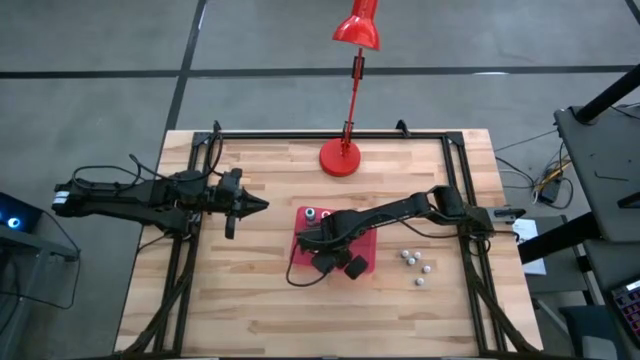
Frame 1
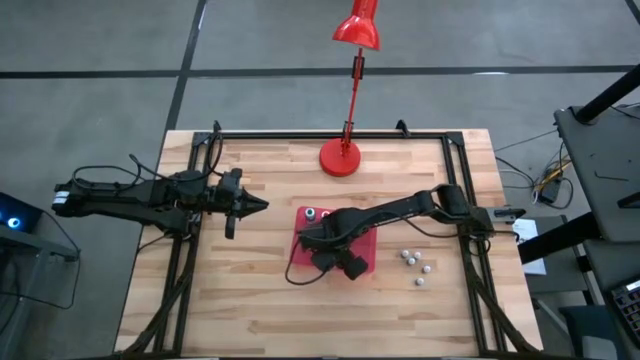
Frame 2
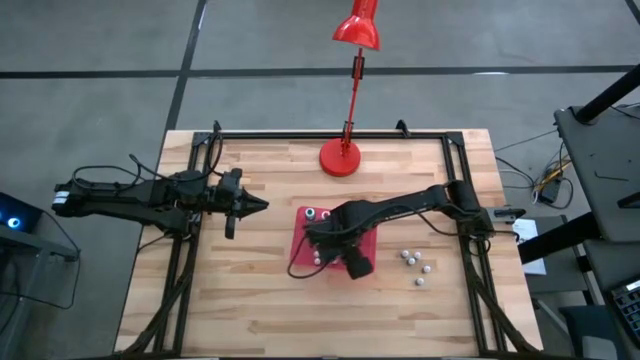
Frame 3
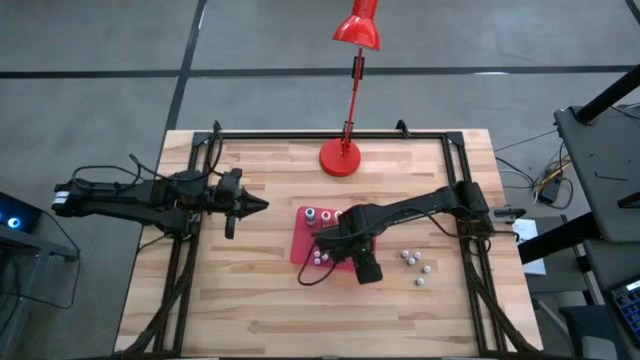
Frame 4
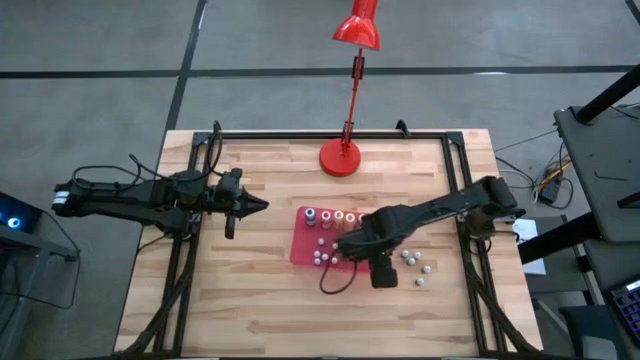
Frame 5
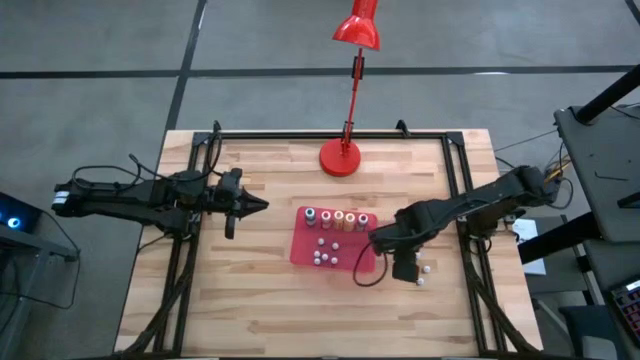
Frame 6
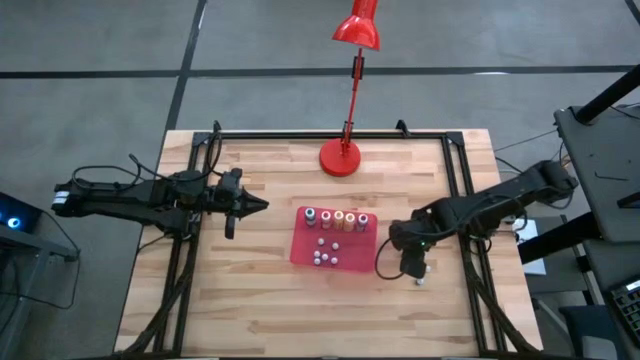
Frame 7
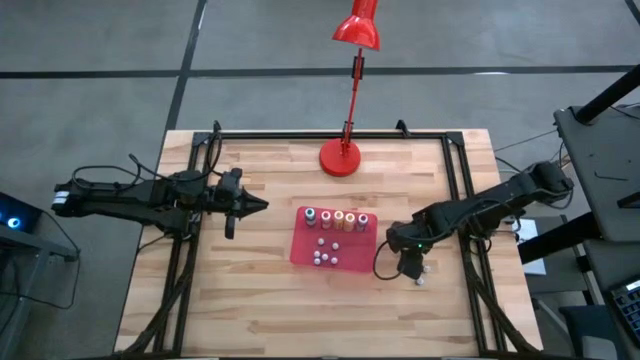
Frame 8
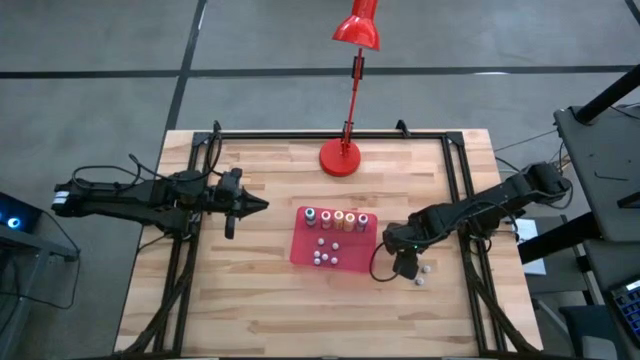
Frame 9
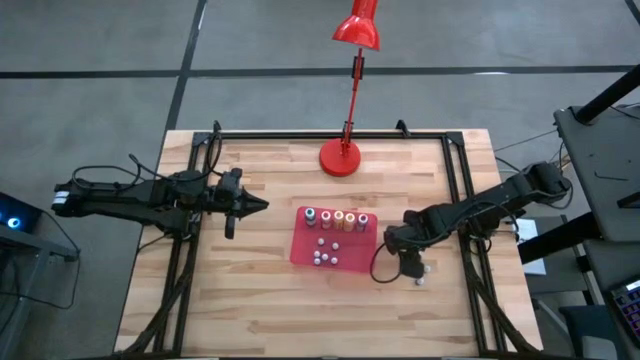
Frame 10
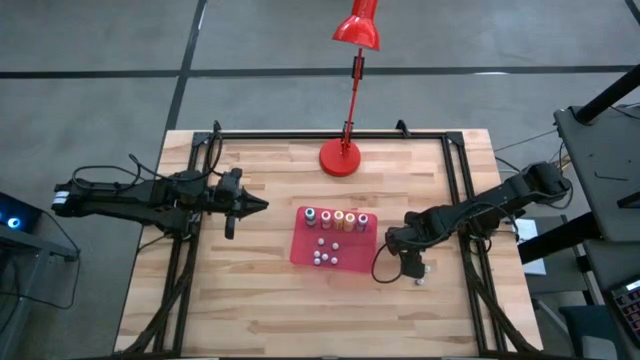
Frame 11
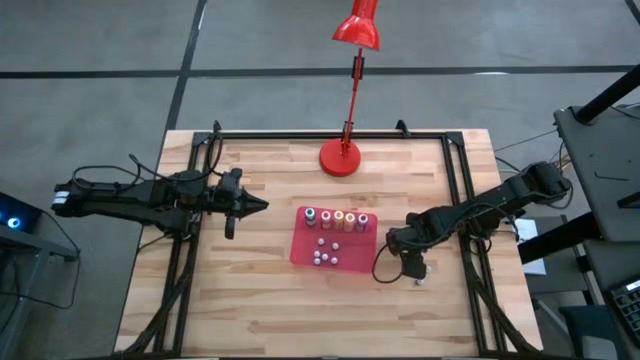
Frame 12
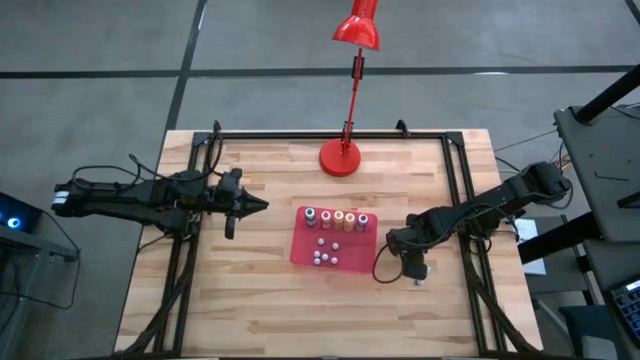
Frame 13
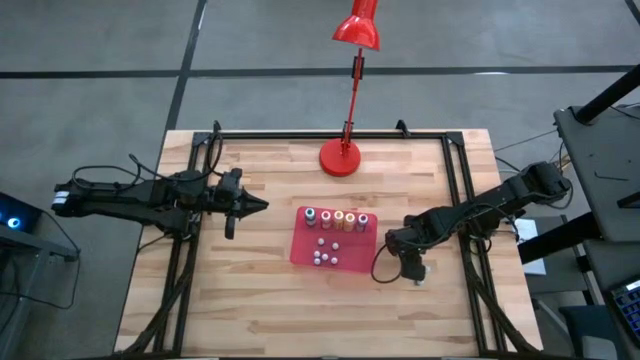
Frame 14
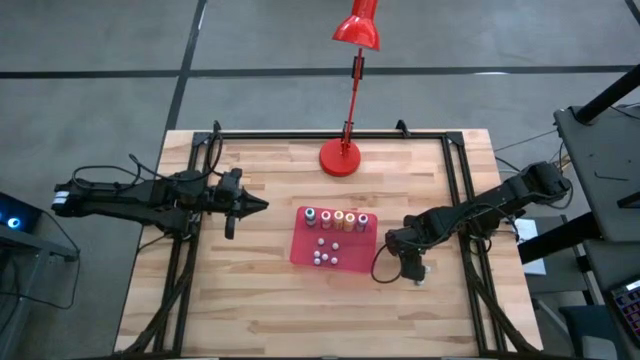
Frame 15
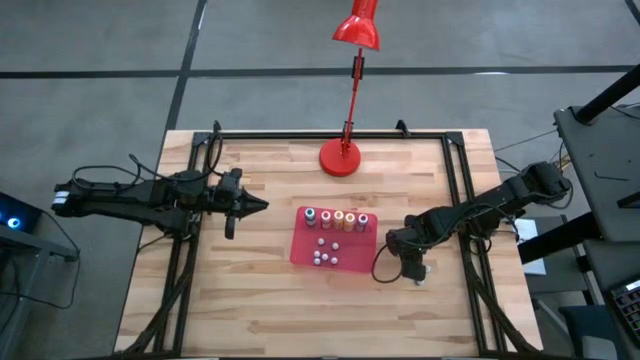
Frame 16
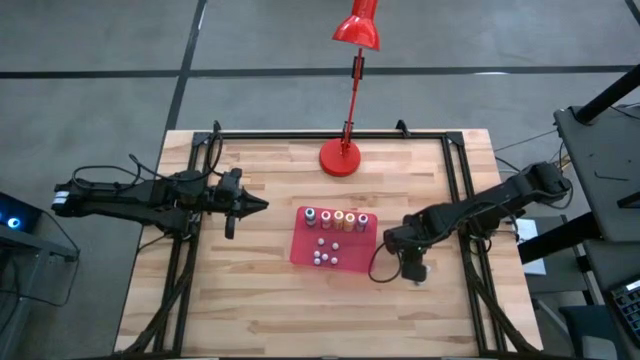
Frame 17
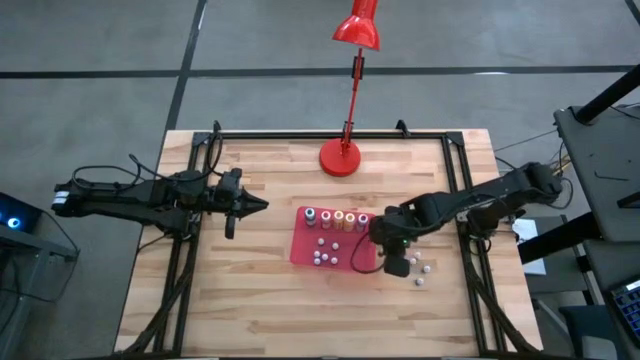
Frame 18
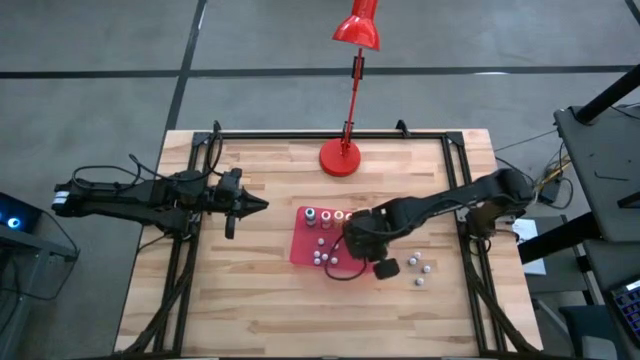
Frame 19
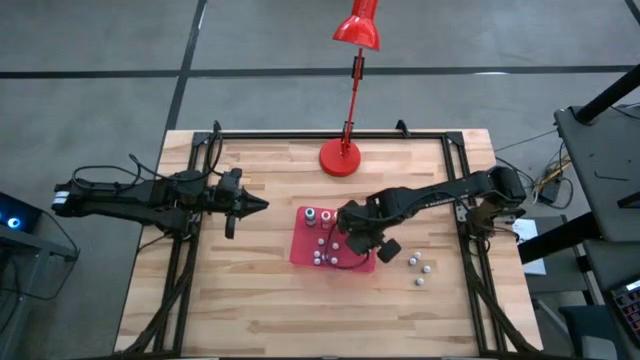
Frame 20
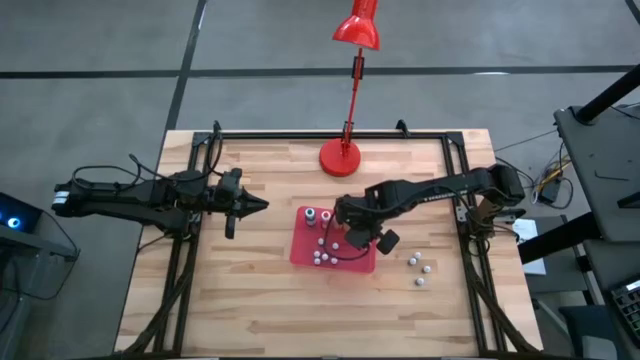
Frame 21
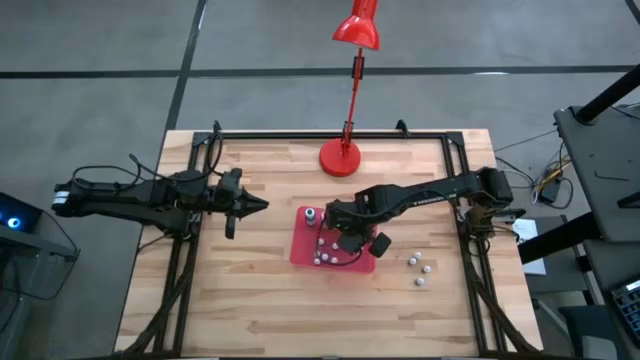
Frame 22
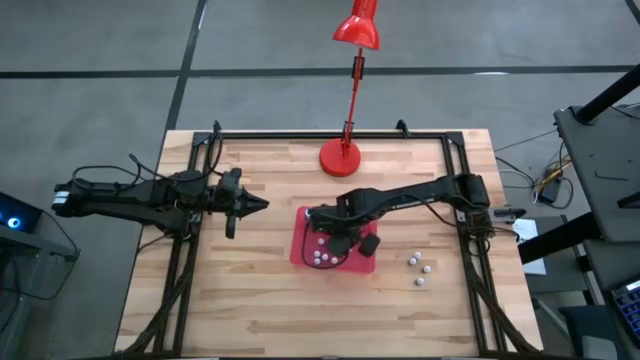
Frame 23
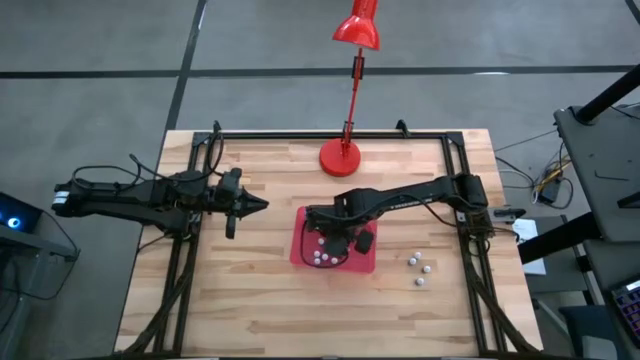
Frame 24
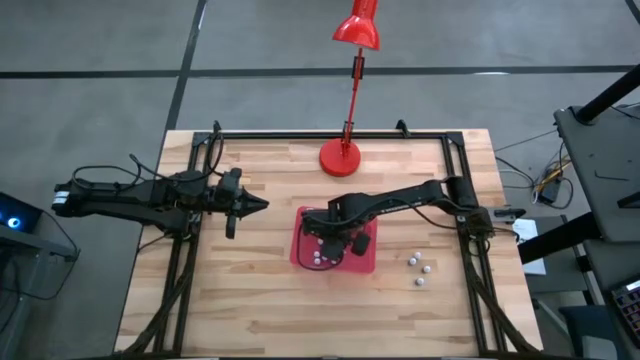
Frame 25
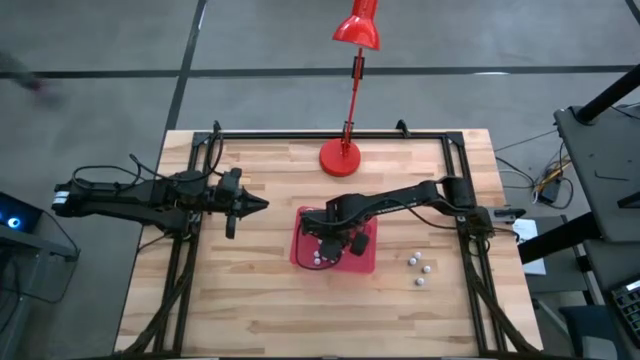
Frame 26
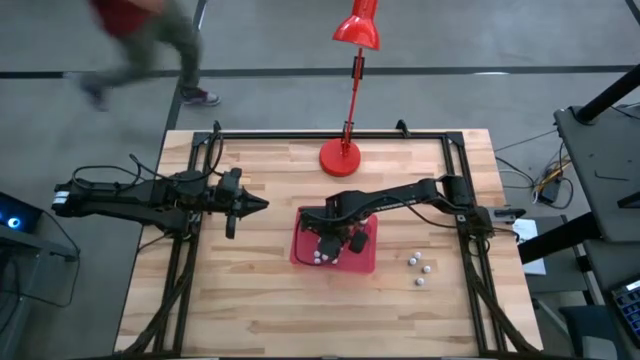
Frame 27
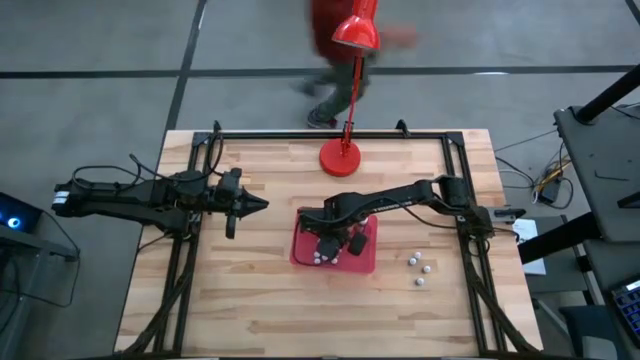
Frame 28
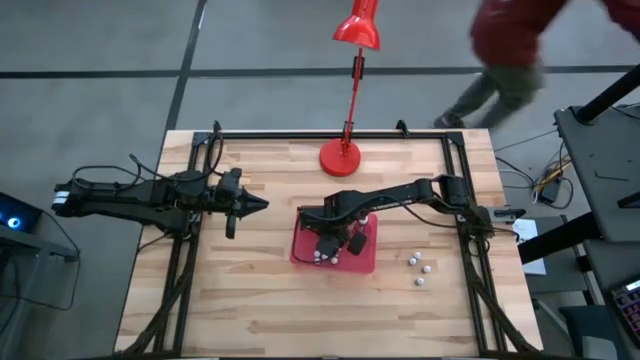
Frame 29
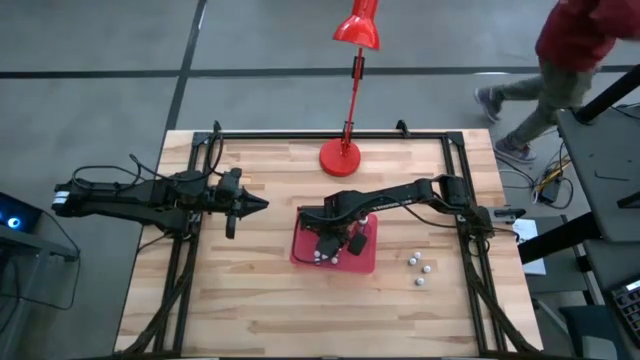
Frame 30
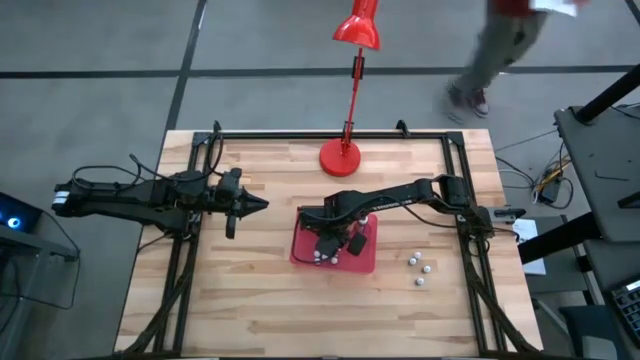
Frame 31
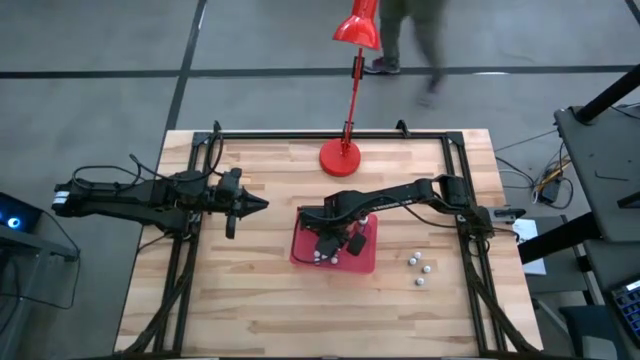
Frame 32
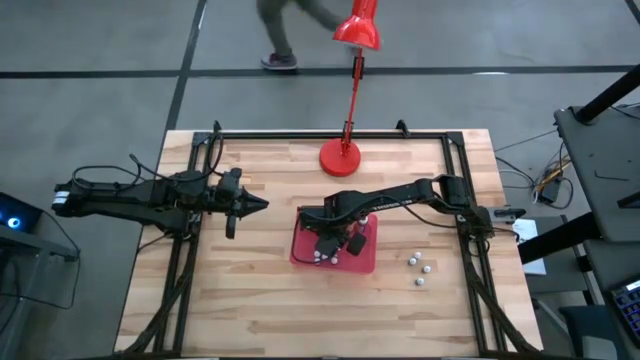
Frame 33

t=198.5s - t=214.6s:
Task: Pick & Place food coloring
Put the small black food coloring bottle into the red bin

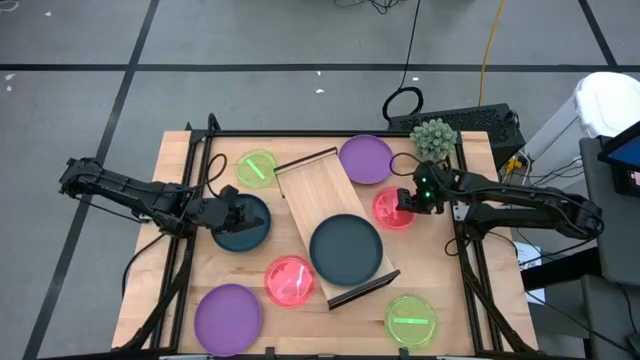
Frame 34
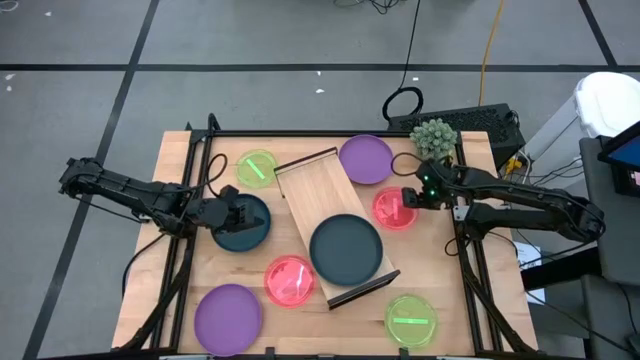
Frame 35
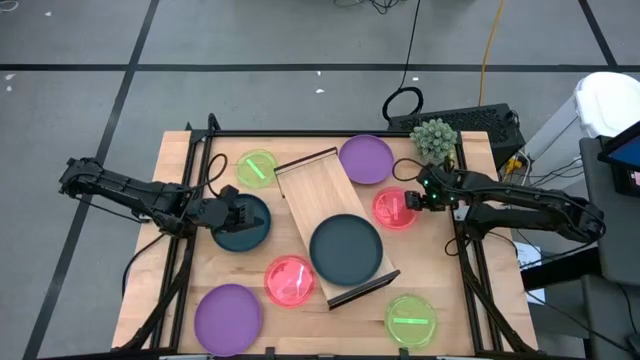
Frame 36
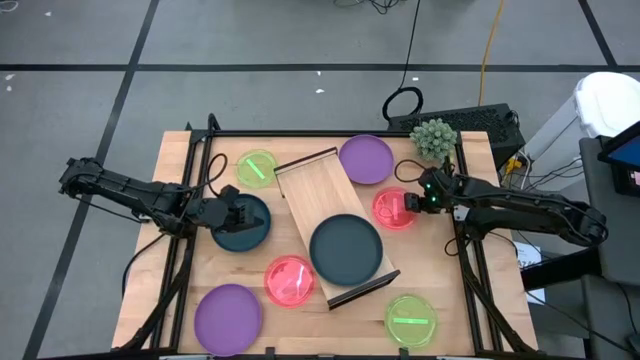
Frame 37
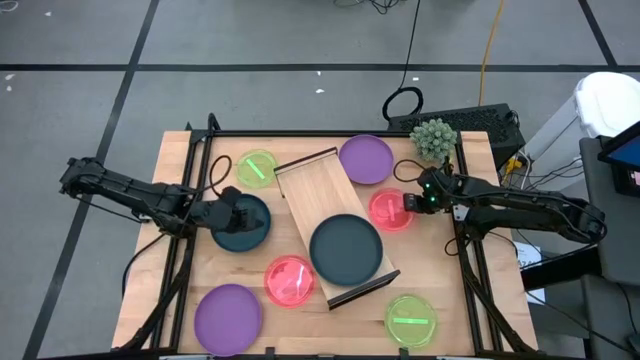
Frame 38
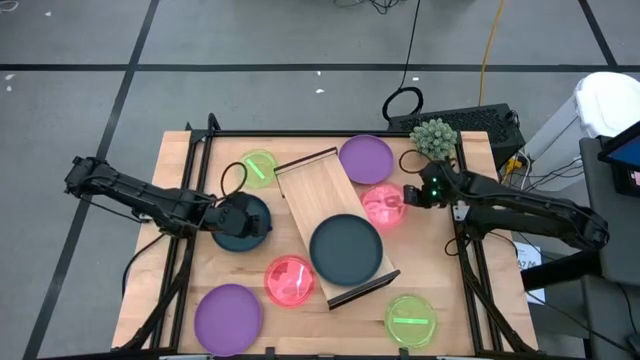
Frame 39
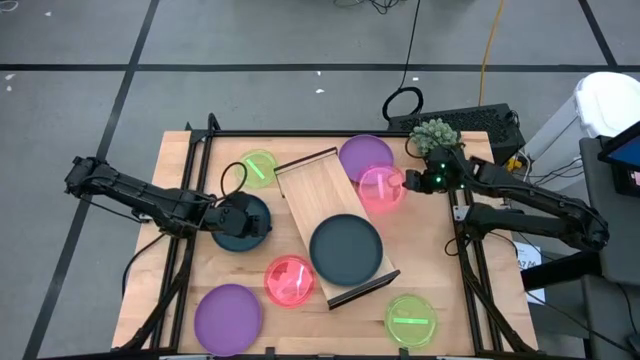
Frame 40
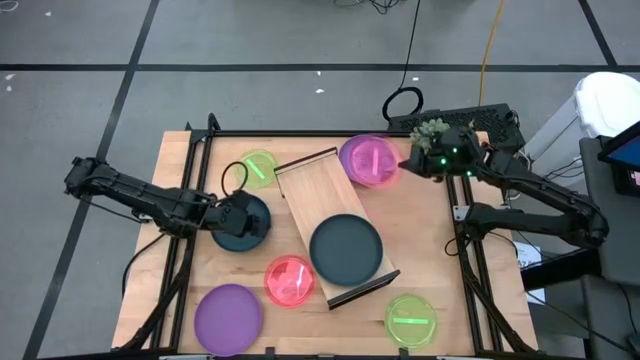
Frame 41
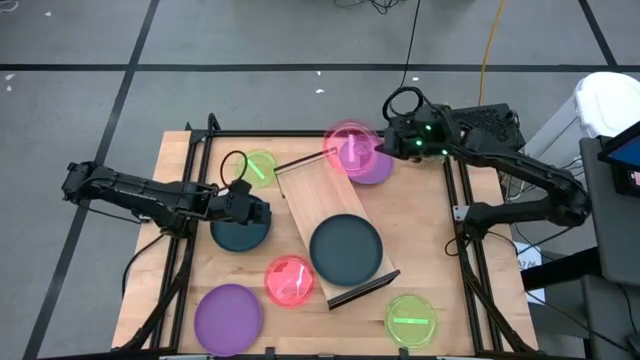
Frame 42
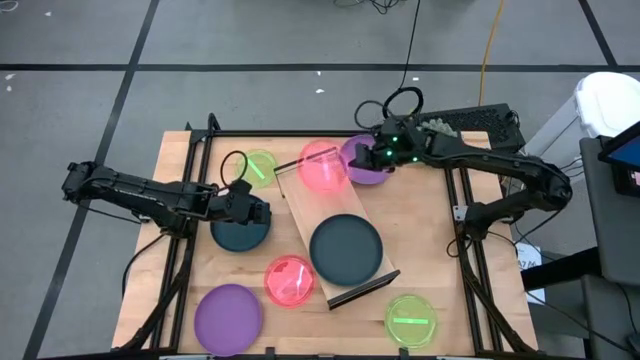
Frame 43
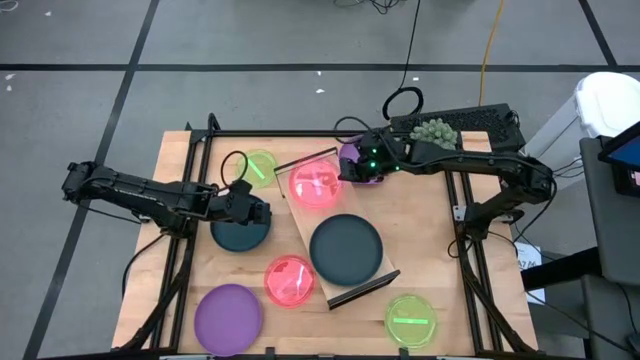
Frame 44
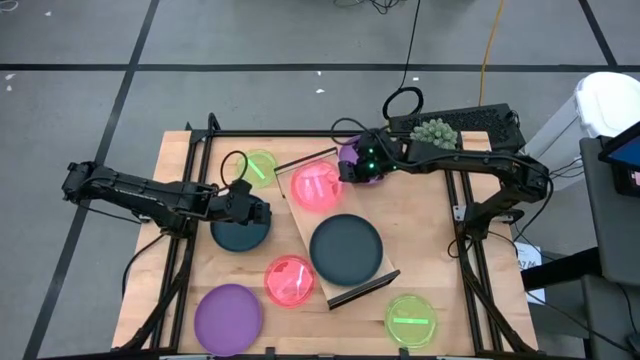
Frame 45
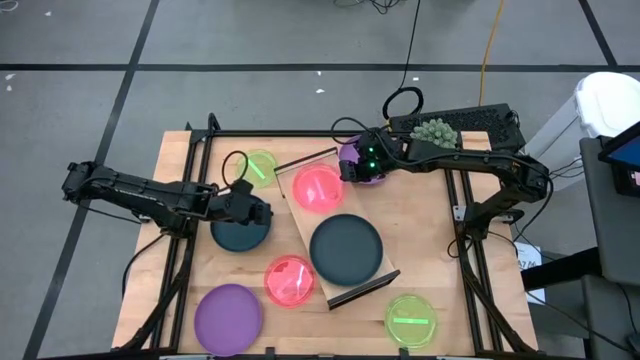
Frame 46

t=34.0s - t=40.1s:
Task: Place and stack plates onto a shelf
Put the top pink plate on the shelf
